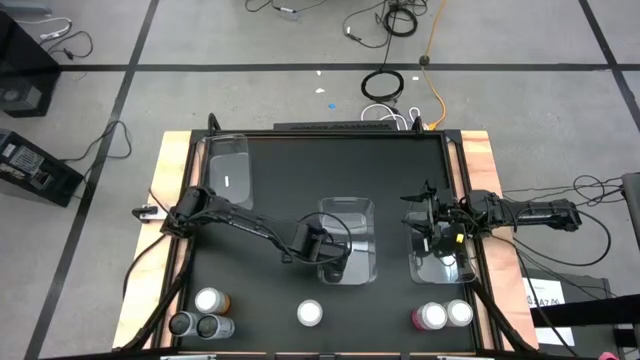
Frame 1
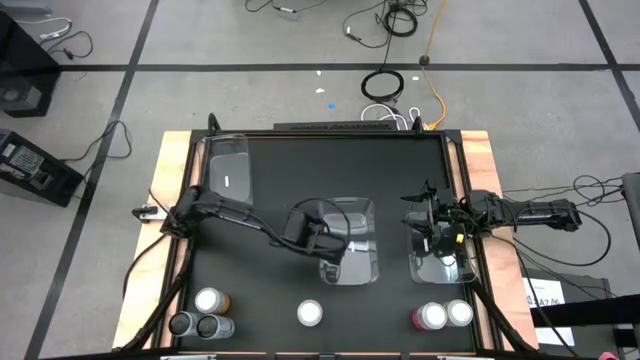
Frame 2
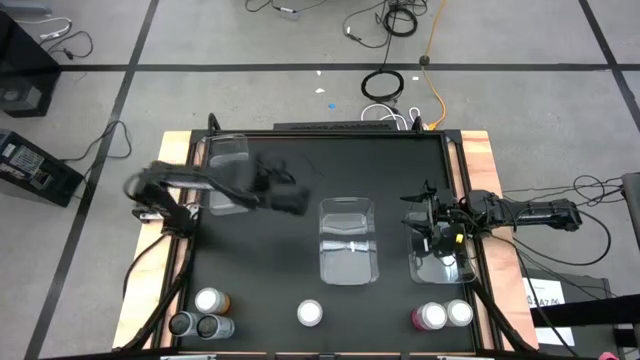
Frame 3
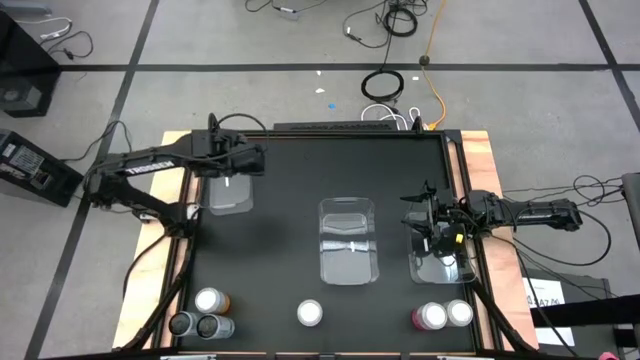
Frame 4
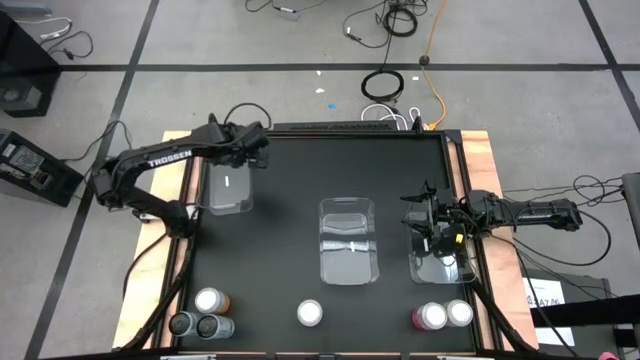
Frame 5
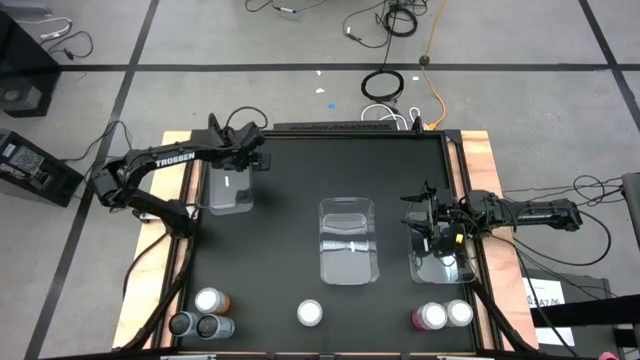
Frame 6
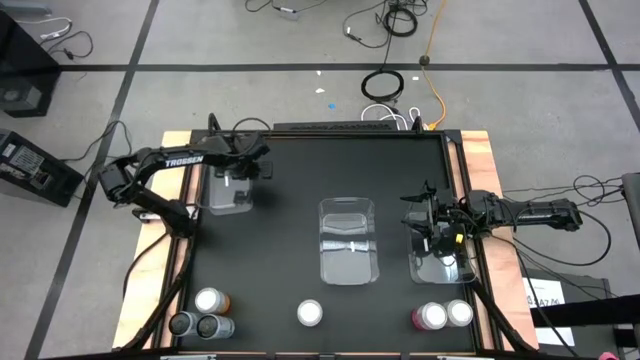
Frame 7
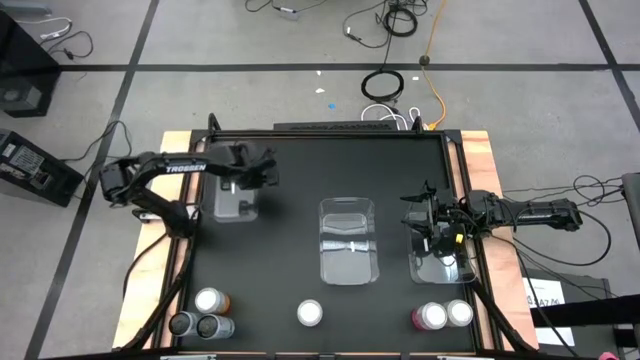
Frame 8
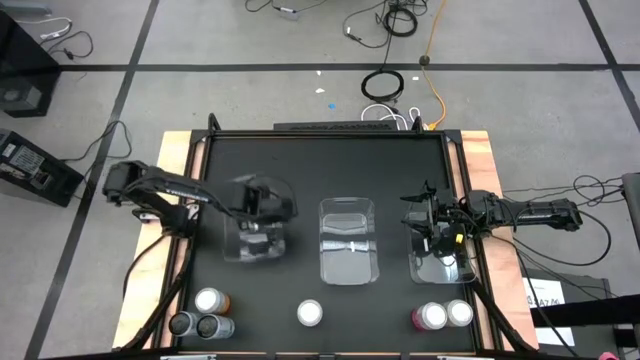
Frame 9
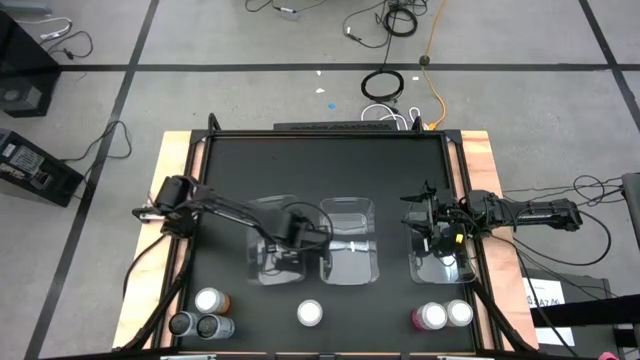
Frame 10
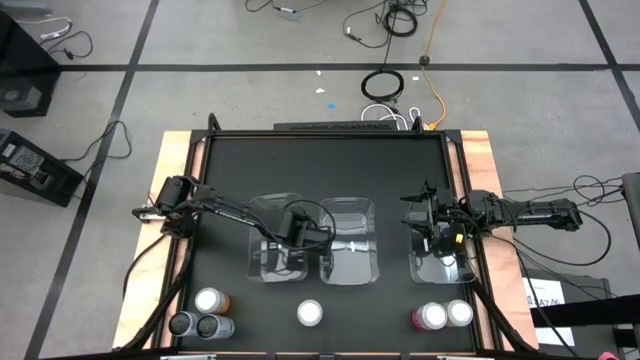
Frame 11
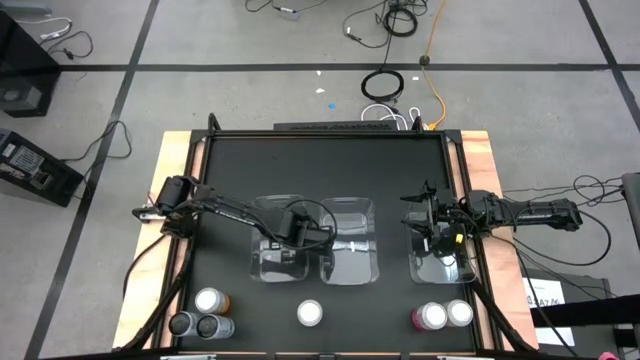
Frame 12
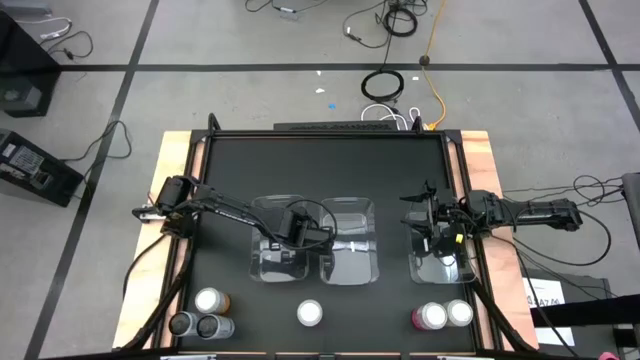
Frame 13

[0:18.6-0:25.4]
Task: Sort soda cans
Move the top left transparent bin to the center

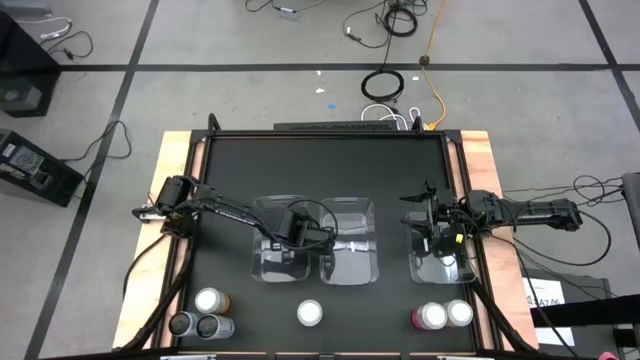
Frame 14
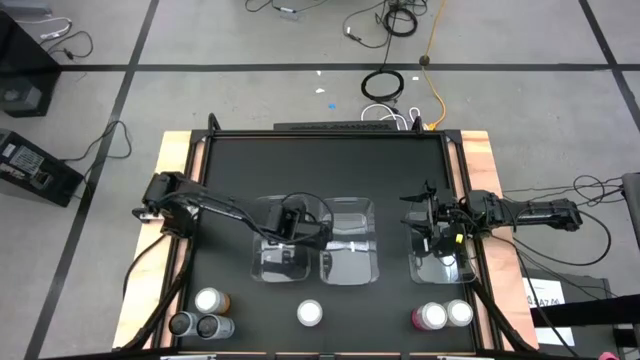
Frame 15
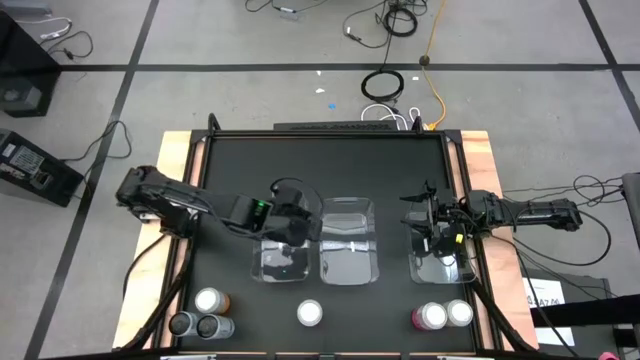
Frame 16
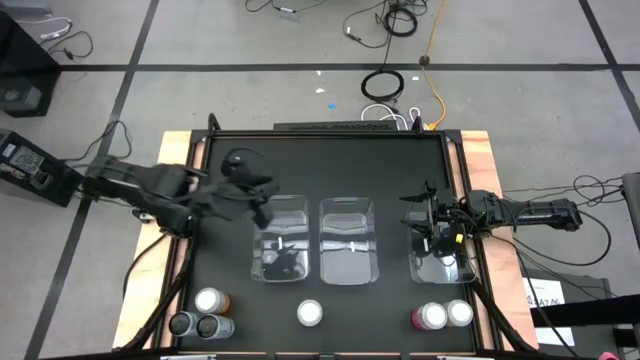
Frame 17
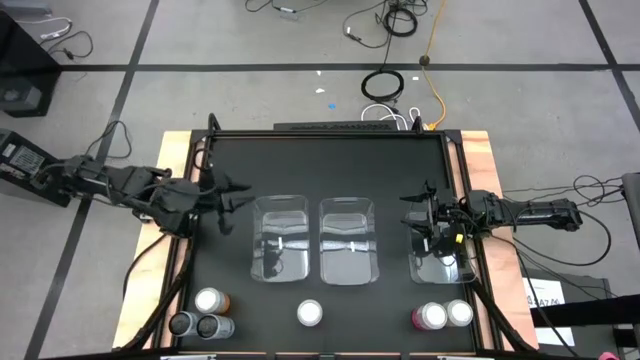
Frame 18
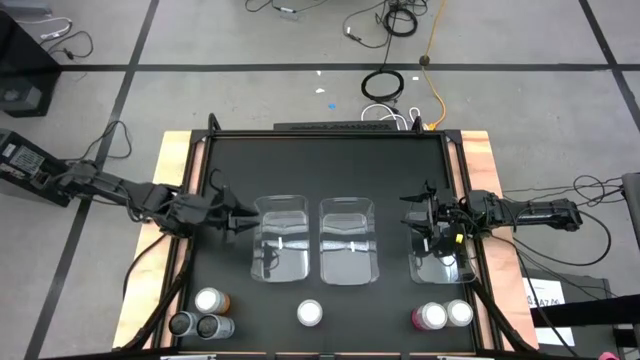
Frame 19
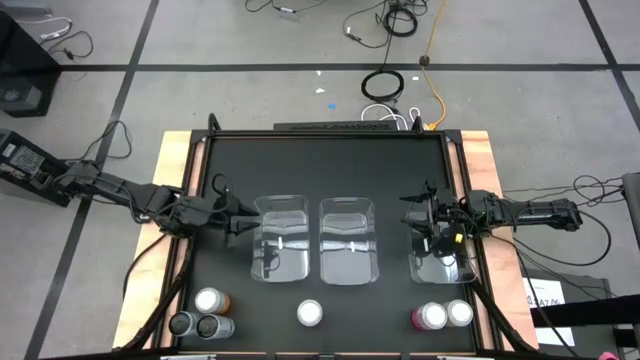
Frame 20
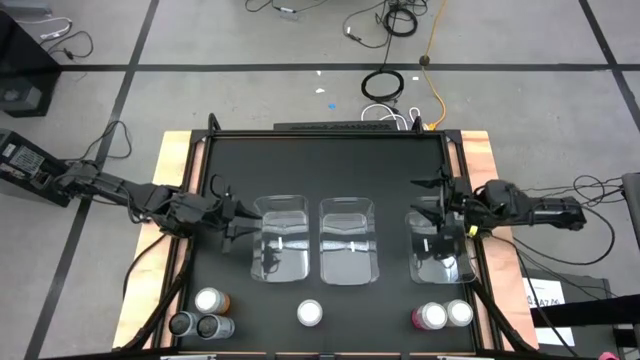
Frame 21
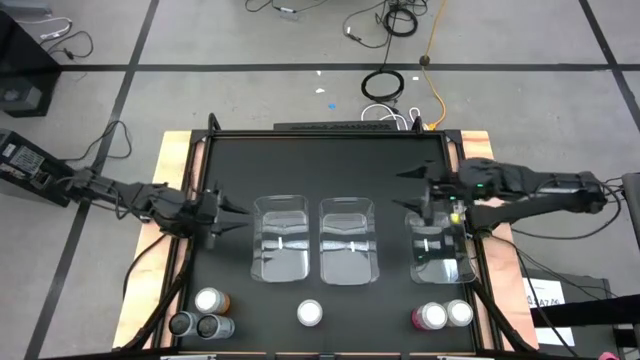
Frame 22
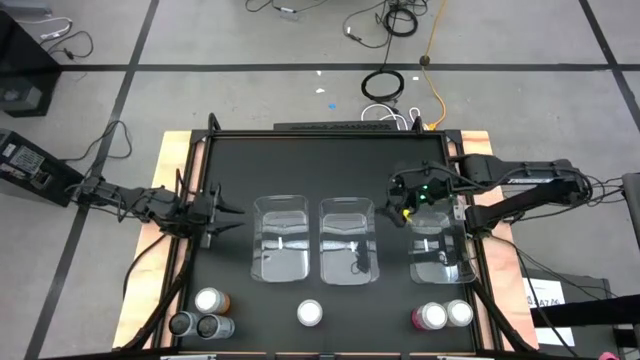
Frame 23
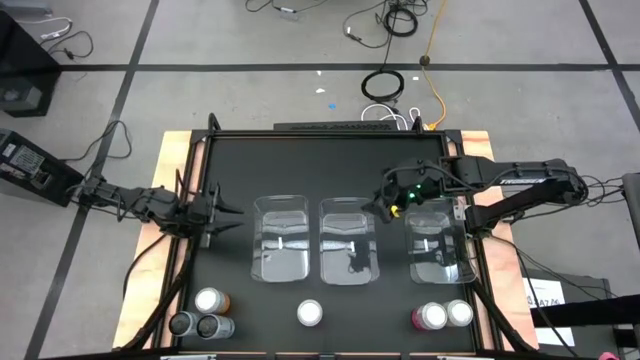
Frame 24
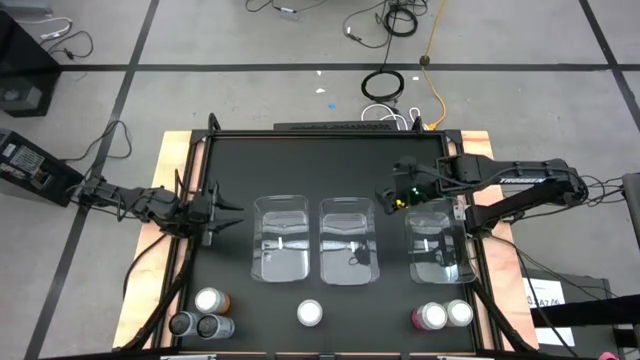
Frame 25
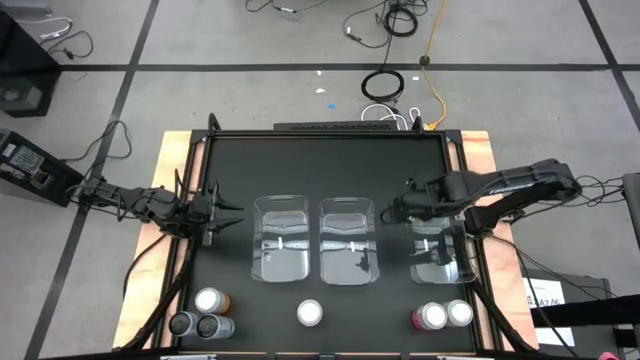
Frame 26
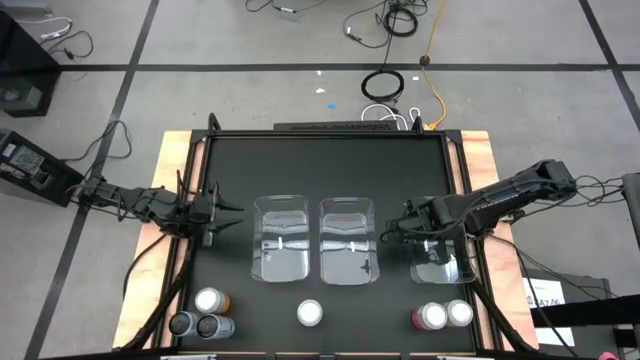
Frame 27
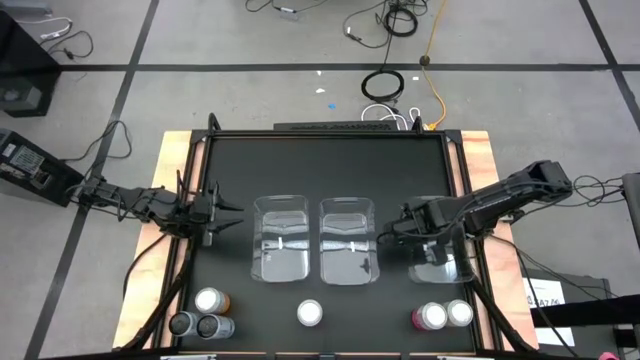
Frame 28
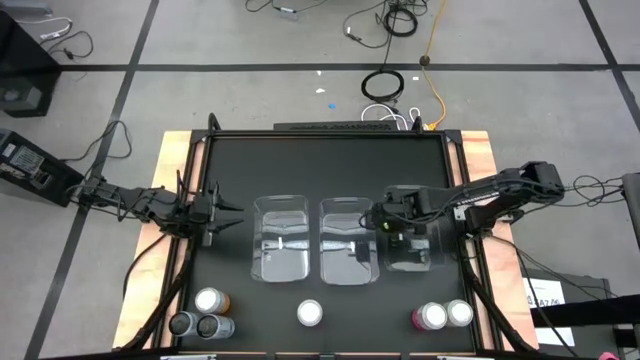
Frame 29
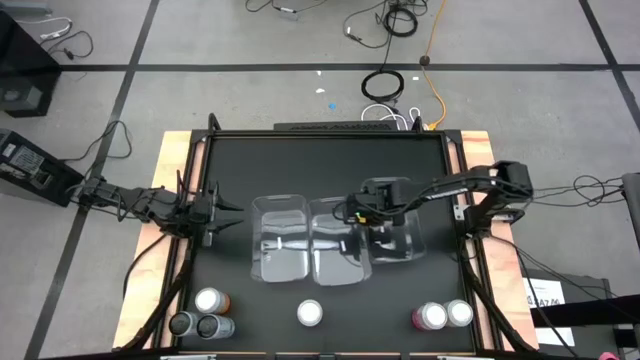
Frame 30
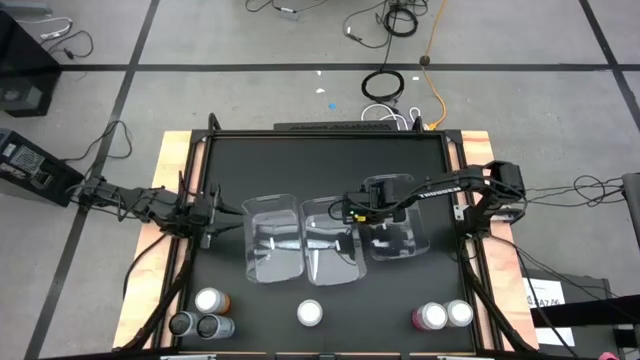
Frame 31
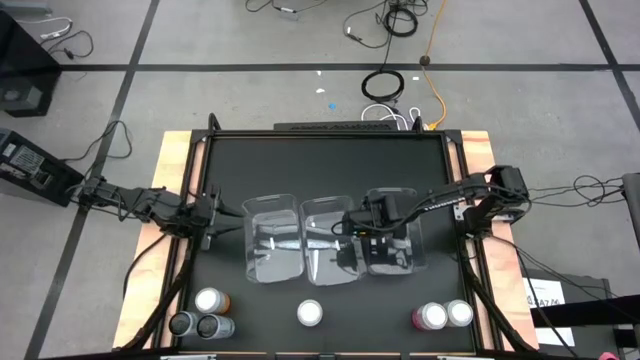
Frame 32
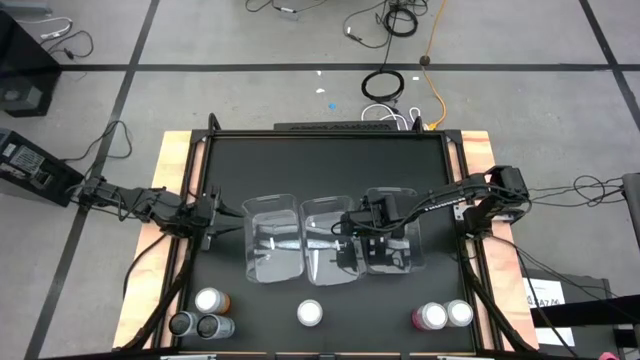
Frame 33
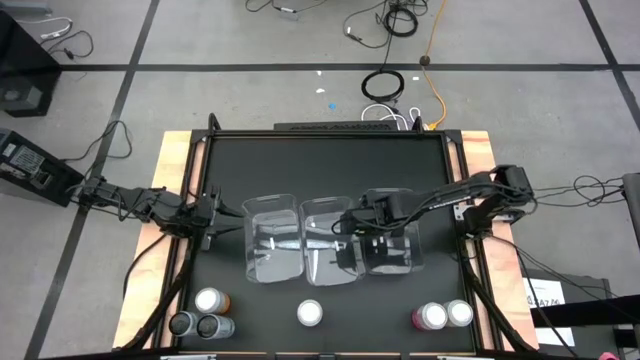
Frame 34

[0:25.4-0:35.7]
Move the right transparent bin to the center

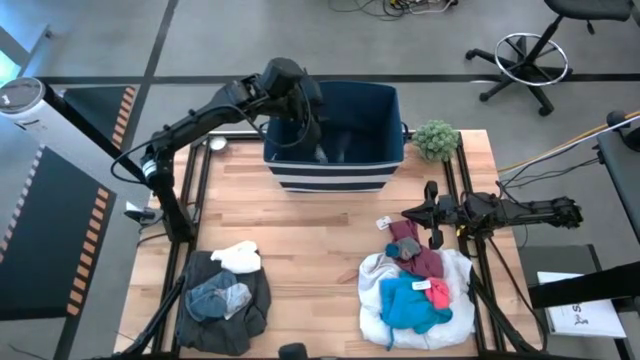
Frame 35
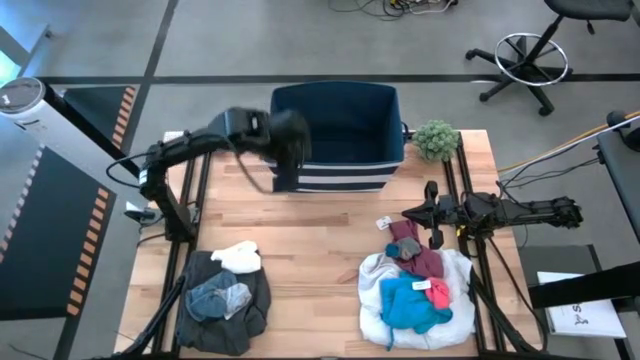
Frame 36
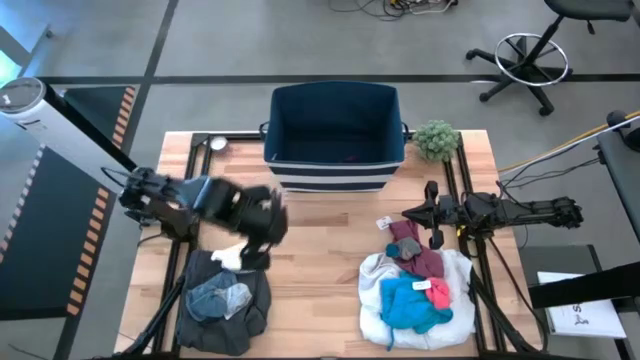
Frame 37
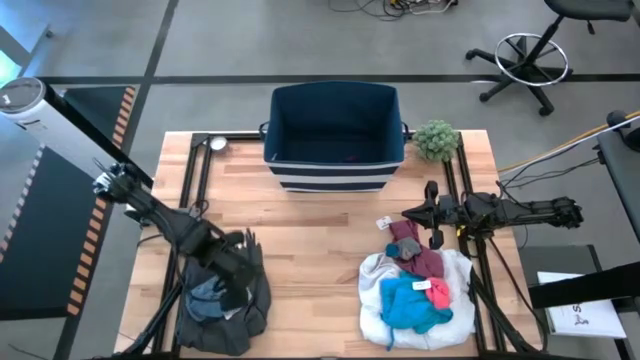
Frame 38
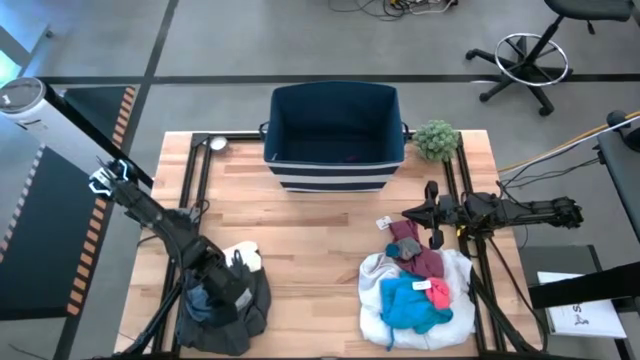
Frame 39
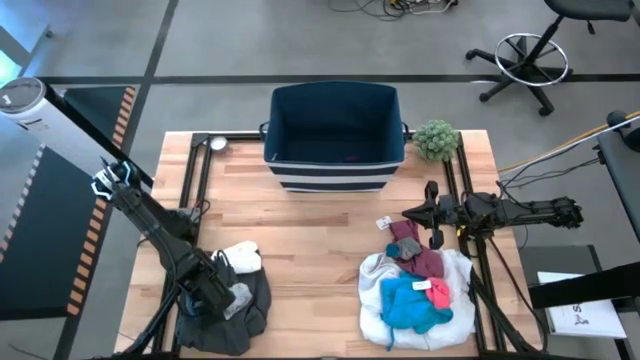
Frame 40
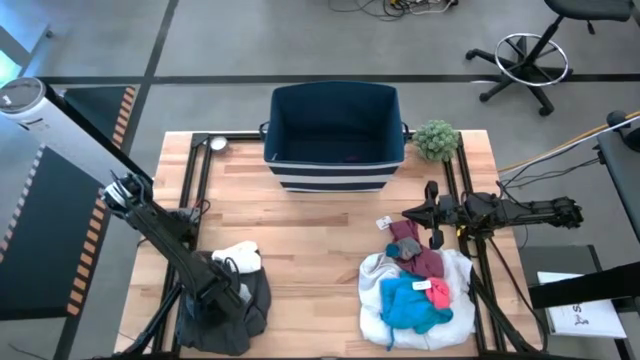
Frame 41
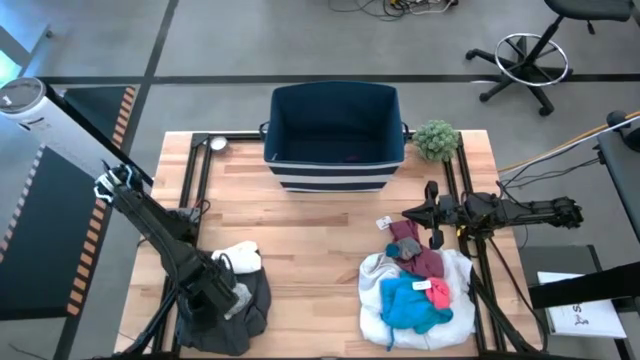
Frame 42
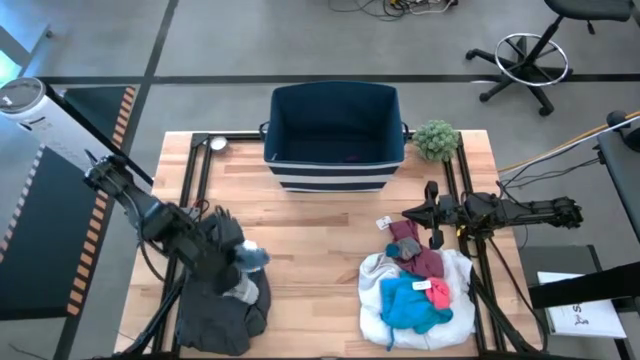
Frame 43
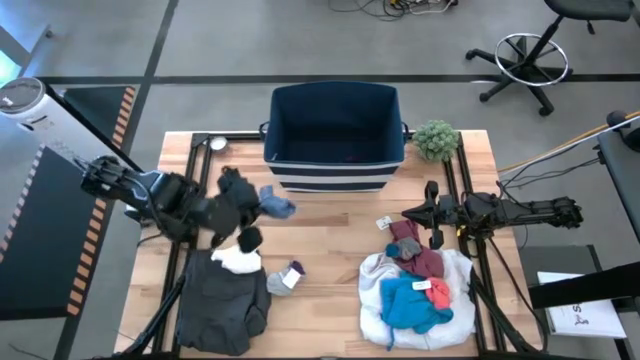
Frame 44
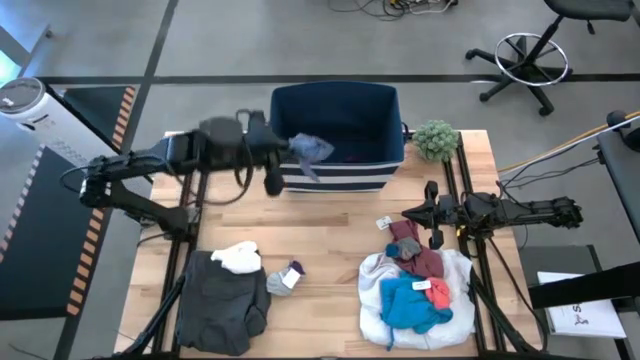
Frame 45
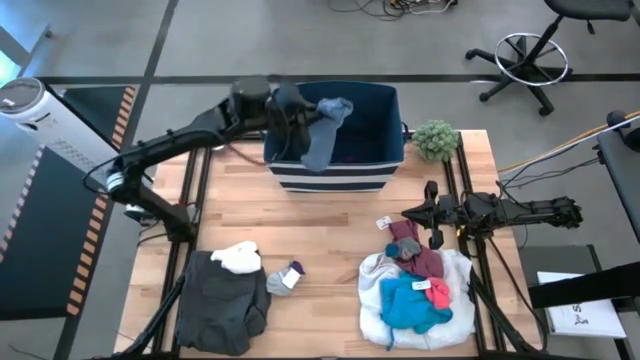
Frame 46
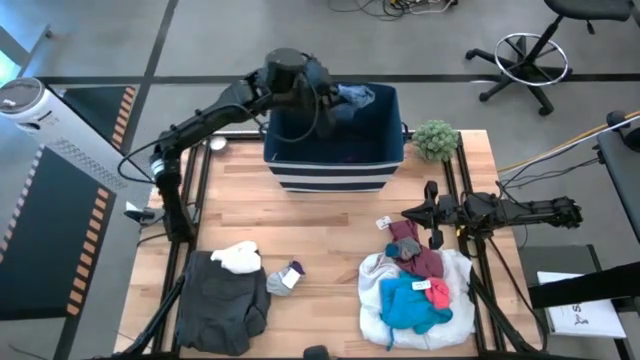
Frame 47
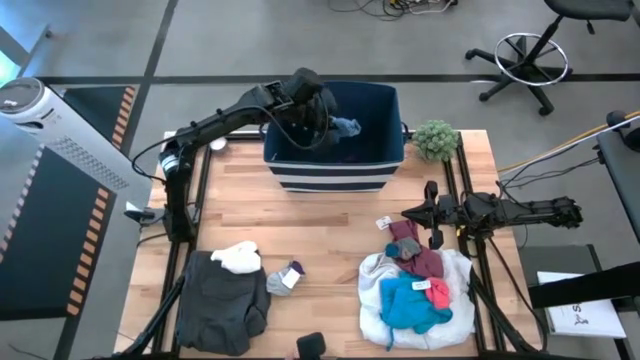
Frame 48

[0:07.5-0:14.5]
Task: Sort clothes
Put the blue socks into the laundry organizer
